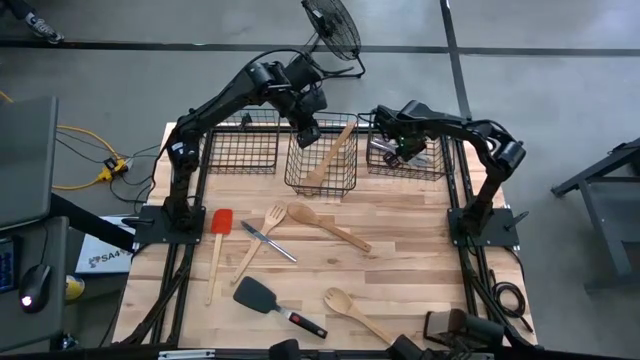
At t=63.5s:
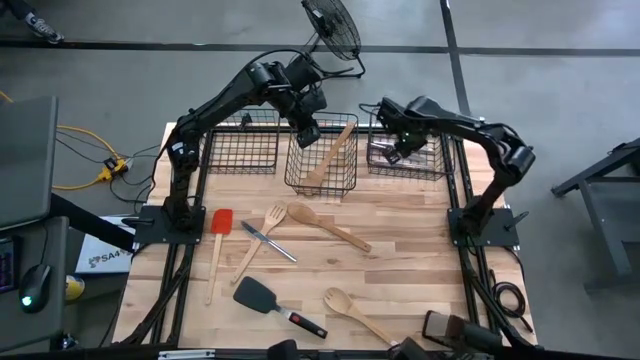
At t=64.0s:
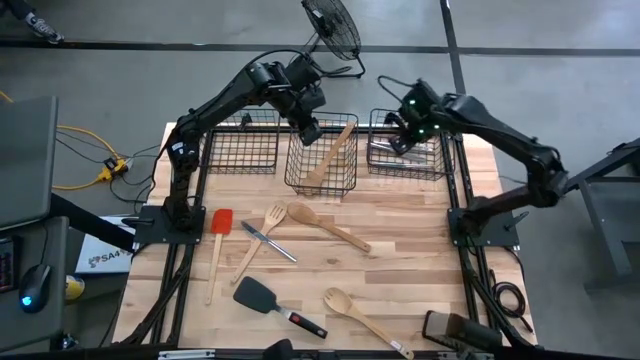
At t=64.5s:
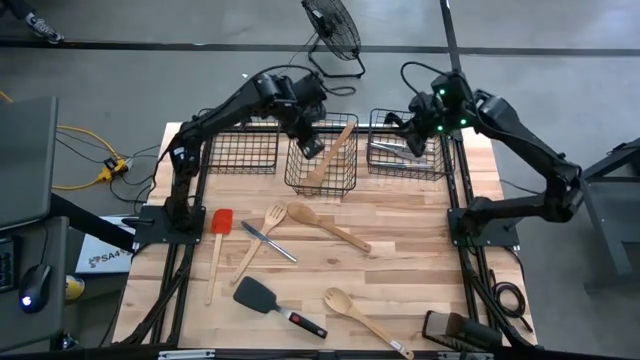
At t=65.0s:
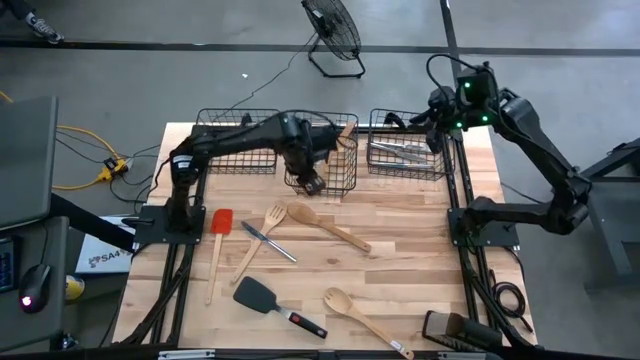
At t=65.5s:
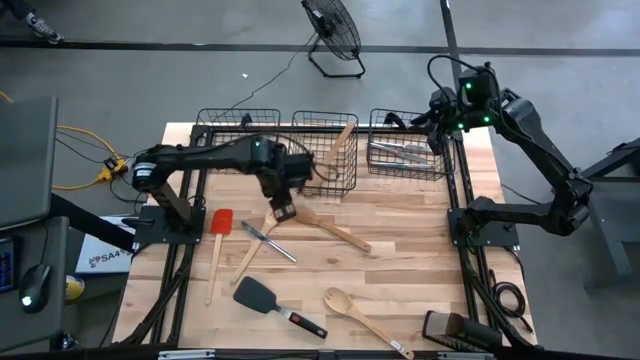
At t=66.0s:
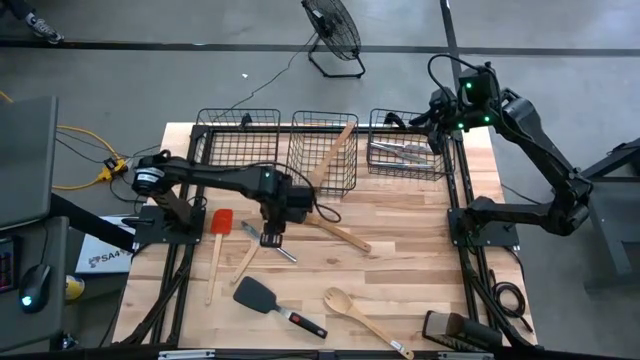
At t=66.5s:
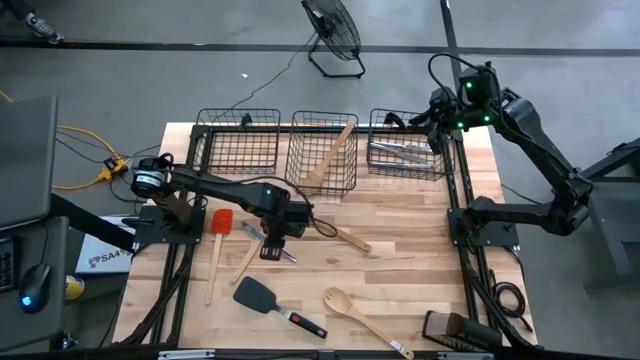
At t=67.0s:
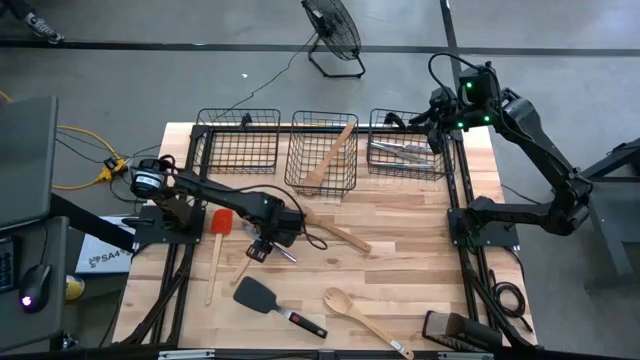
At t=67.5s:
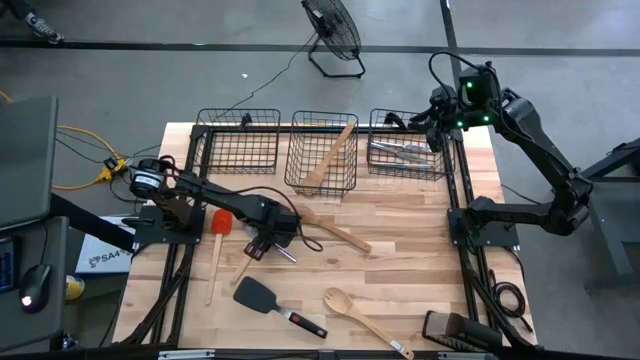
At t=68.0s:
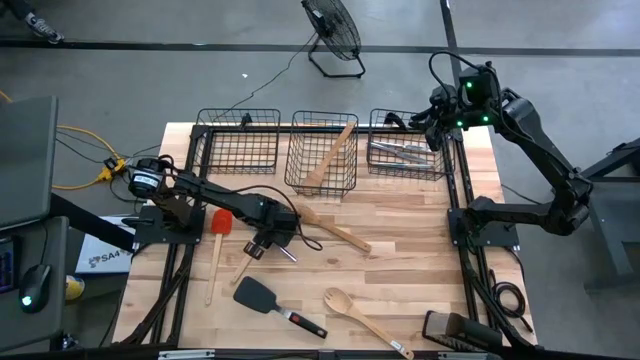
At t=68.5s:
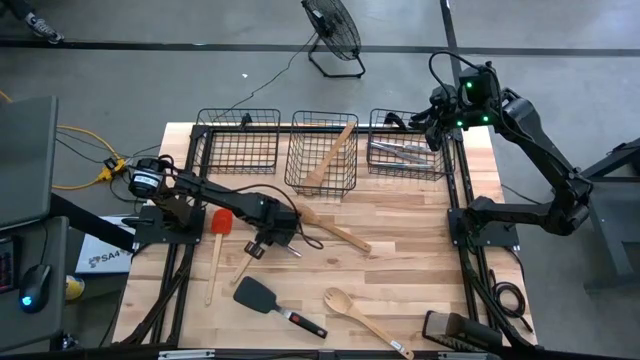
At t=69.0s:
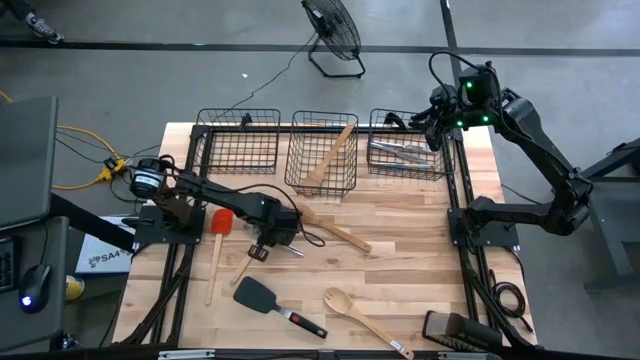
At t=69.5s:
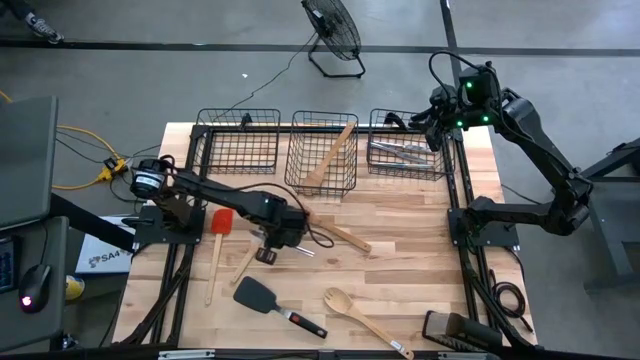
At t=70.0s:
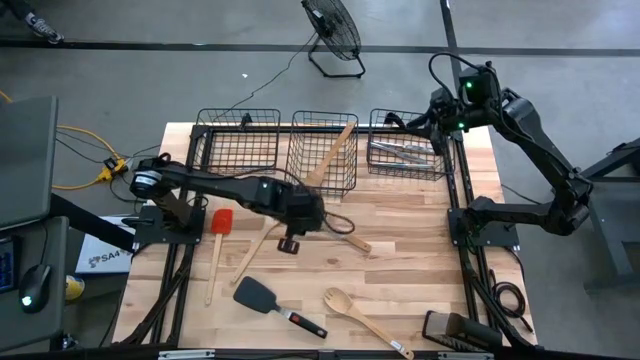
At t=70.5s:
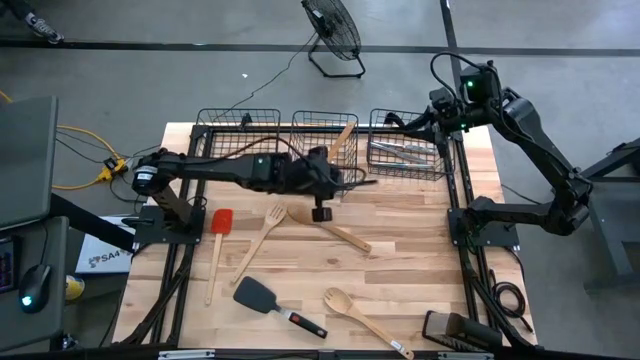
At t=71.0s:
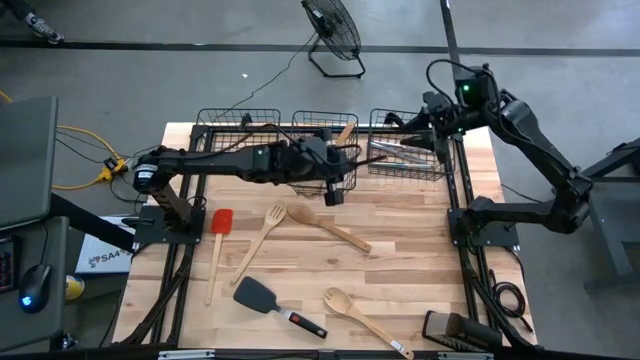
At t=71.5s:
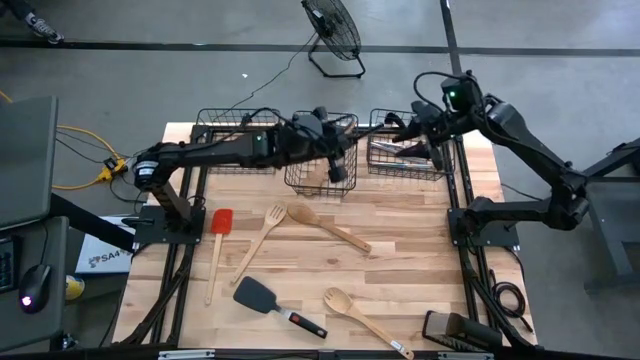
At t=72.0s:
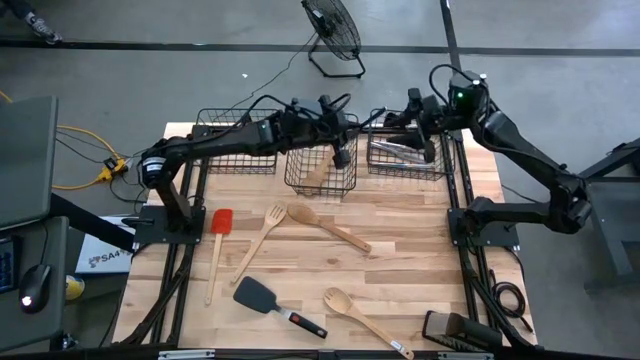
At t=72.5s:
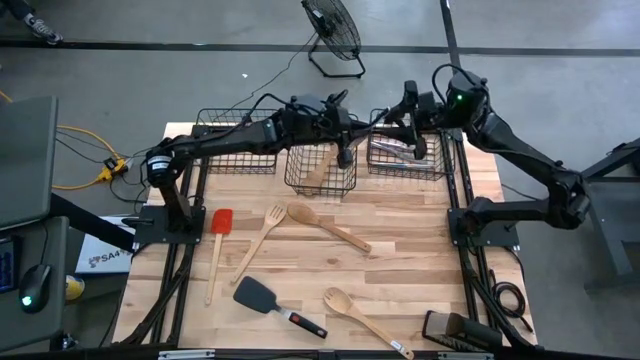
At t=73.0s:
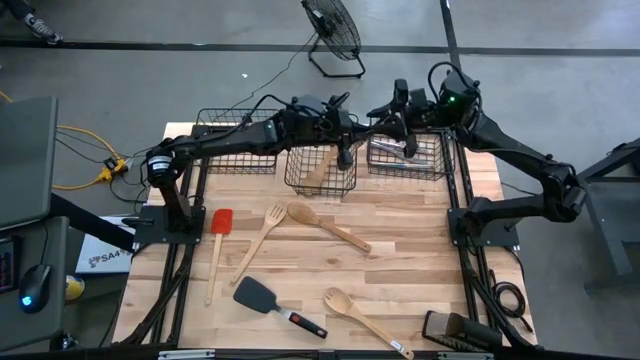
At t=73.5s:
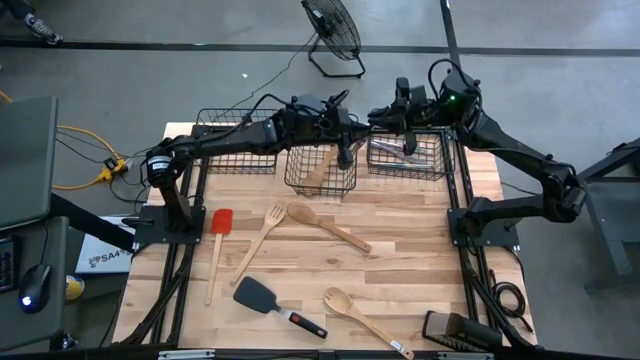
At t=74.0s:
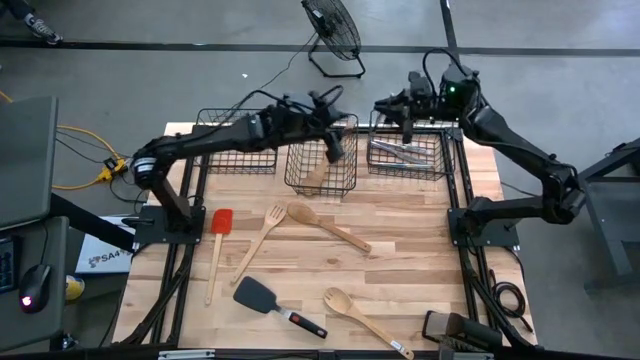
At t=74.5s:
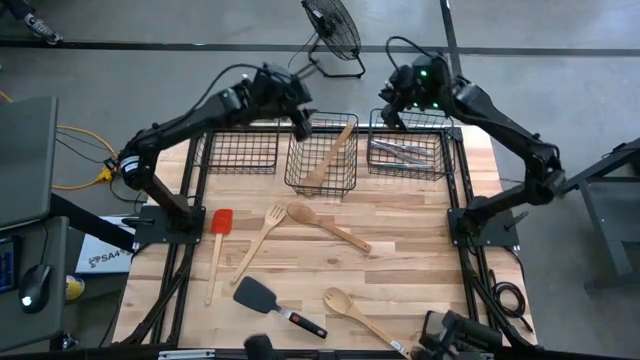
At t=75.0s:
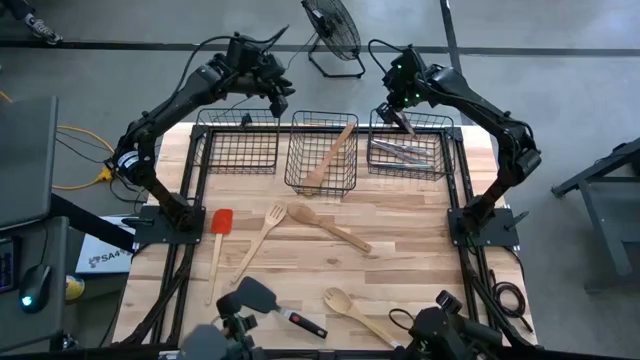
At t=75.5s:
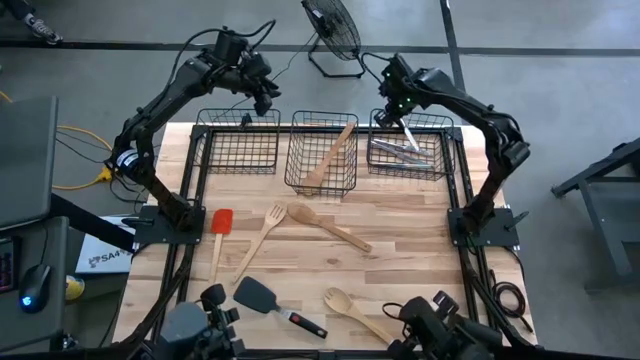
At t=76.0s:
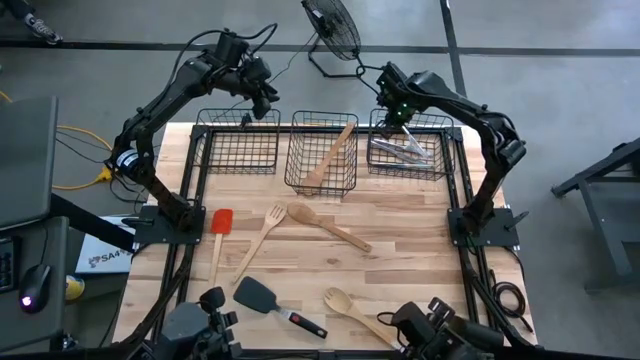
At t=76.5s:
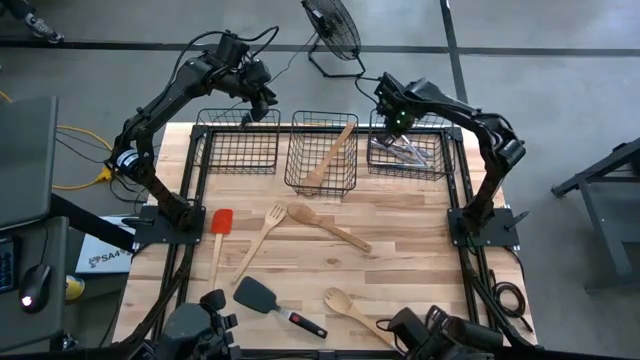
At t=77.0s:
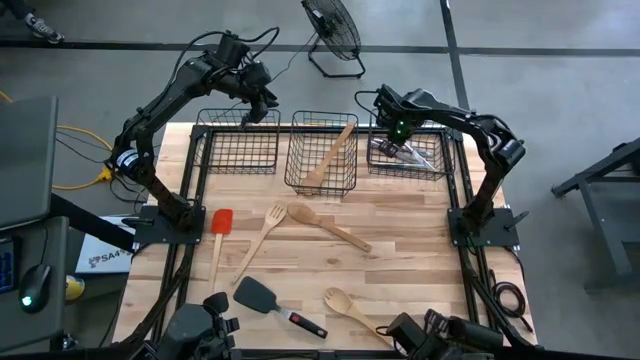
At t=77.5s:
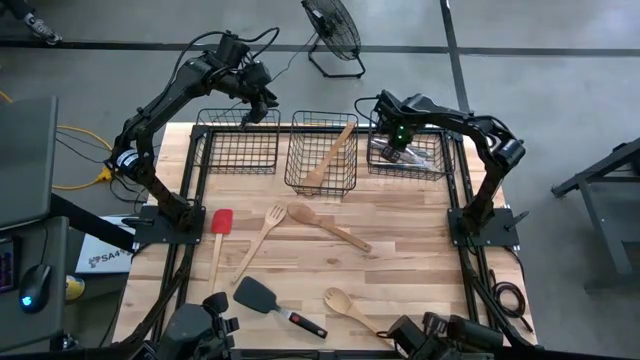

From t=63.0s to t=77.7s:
Task: Pick & Place Kitchen Items
Put the silver table knife into the right wire basket

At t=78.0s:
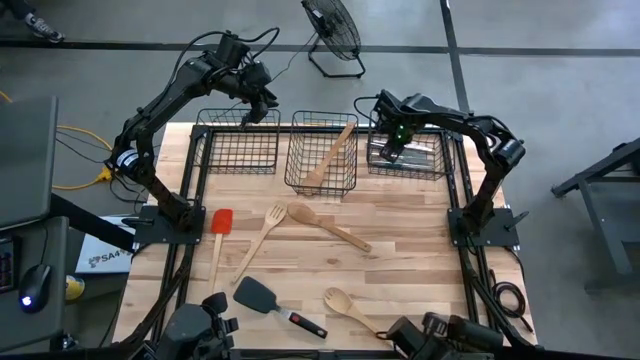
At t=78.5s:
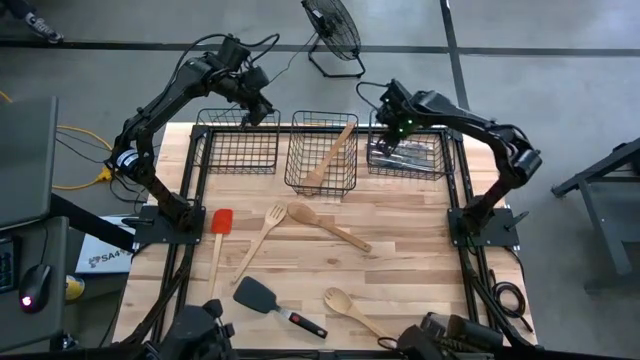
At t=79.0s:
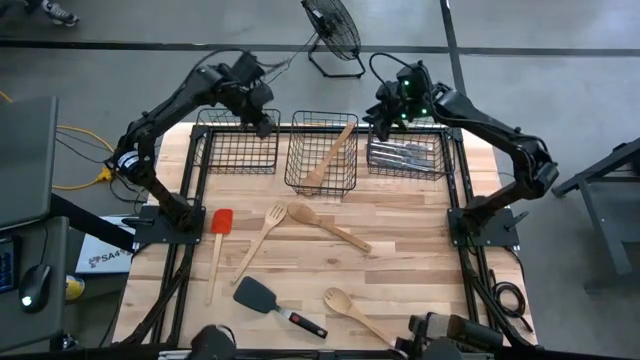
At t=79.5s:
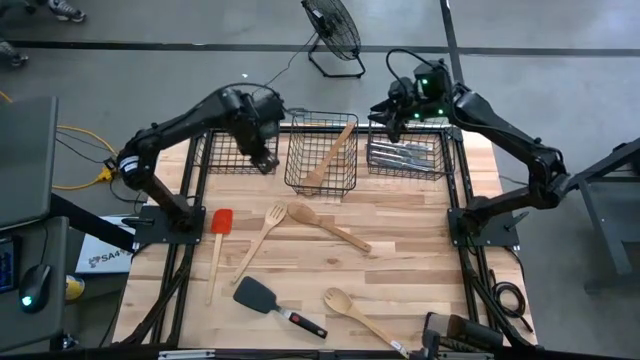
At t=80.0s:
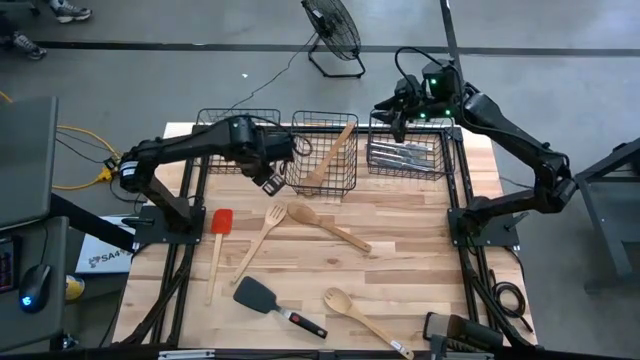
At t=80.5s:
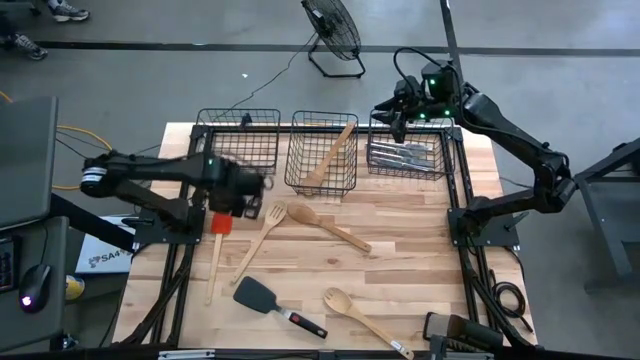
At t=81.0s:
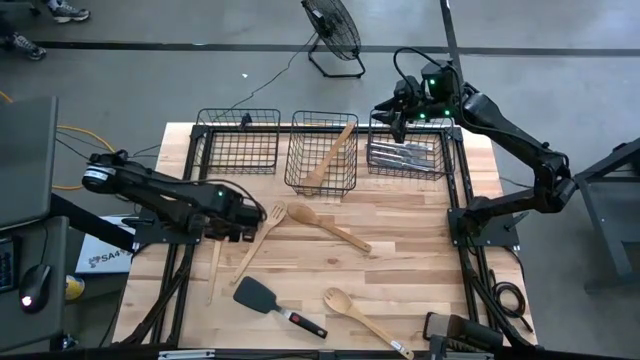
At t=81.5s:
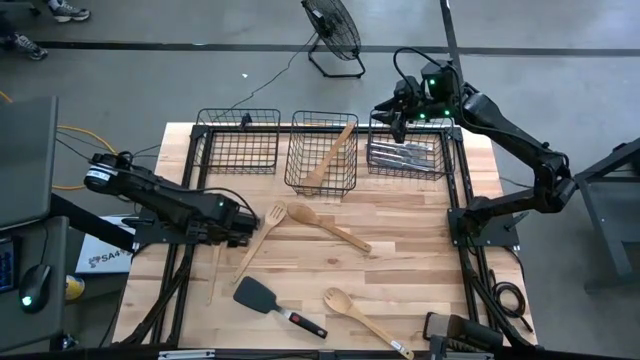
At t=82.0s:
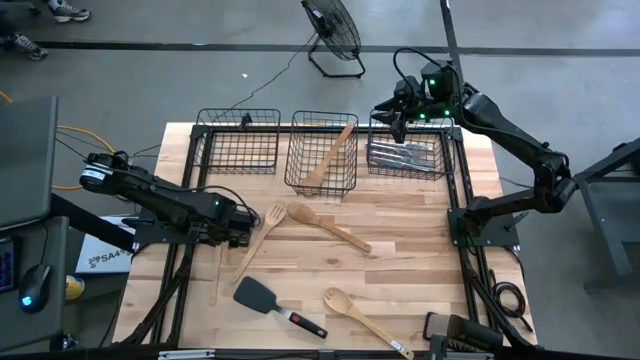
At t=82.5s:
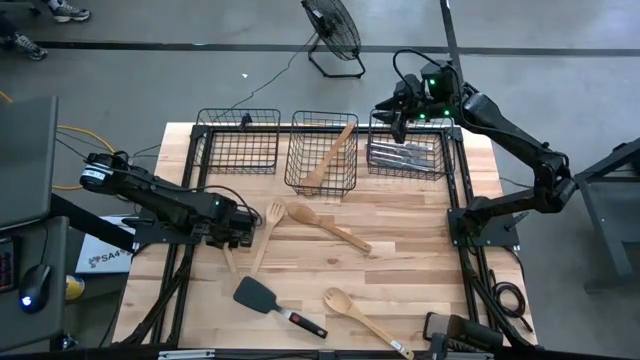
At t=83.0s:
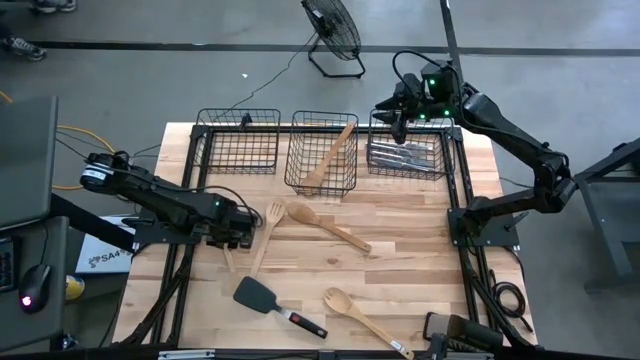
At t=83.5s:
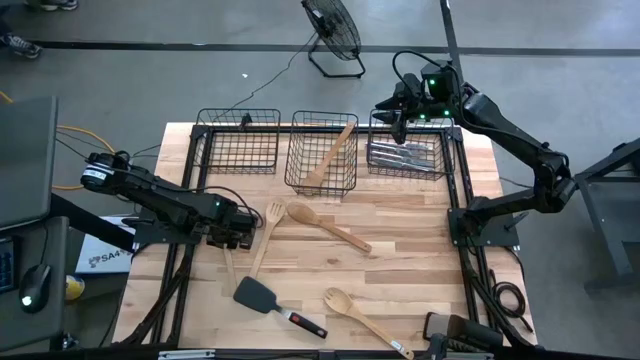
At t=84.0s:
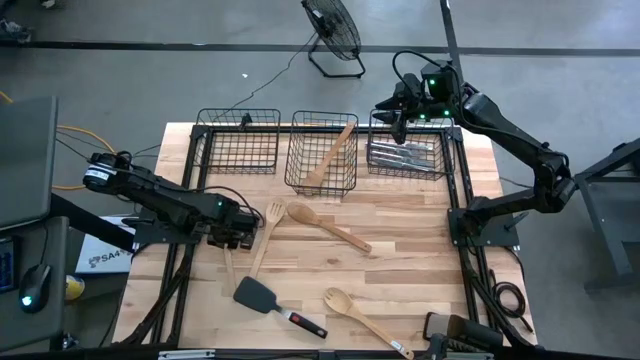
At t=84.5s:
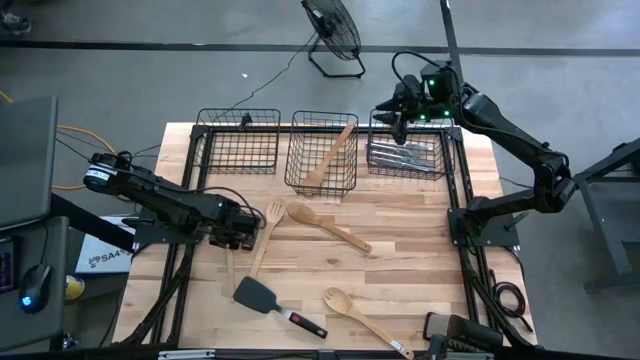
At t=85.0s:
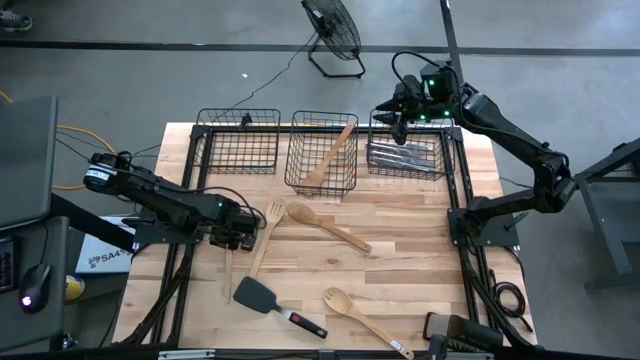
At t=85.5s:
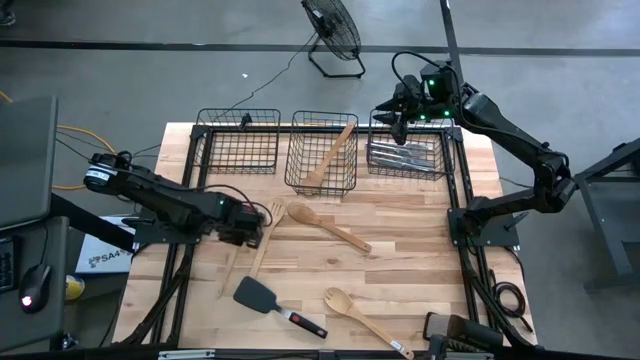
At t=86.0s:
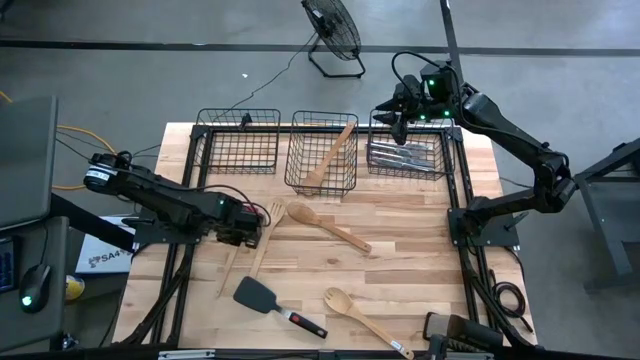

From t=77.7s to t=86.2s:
Put the red spatula into the left wire basket
